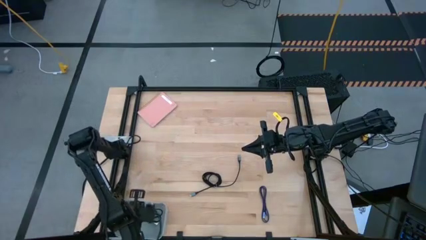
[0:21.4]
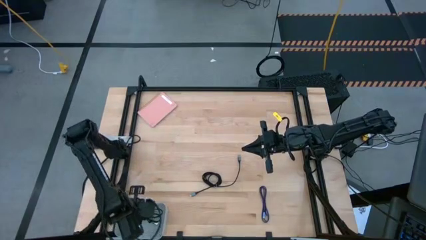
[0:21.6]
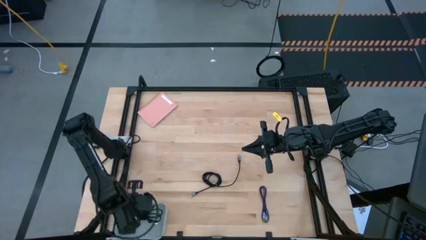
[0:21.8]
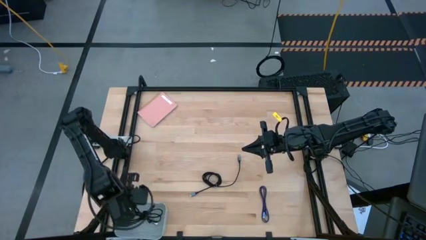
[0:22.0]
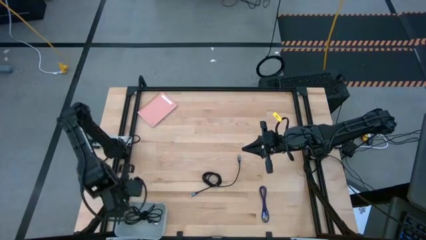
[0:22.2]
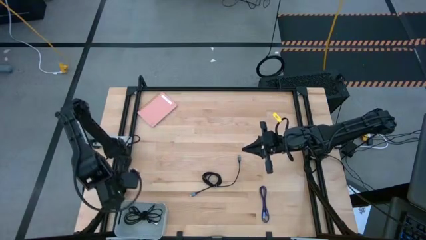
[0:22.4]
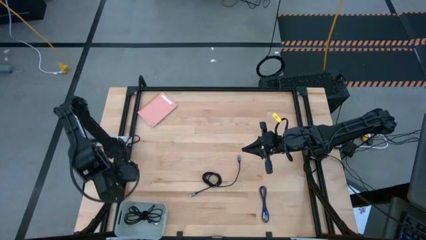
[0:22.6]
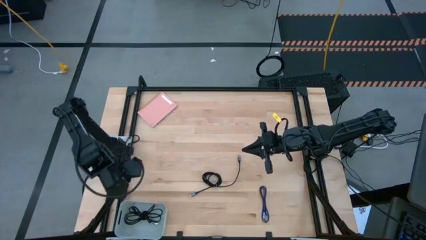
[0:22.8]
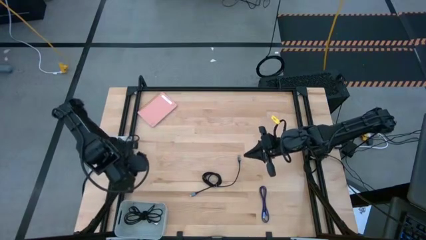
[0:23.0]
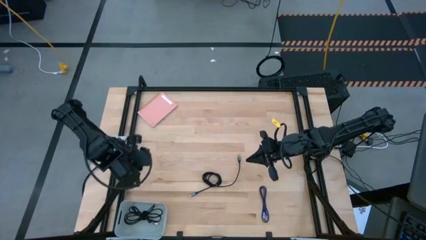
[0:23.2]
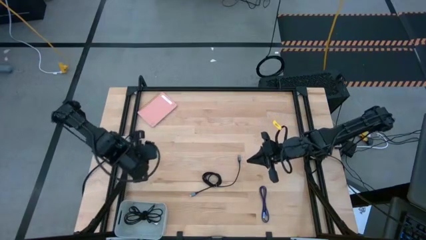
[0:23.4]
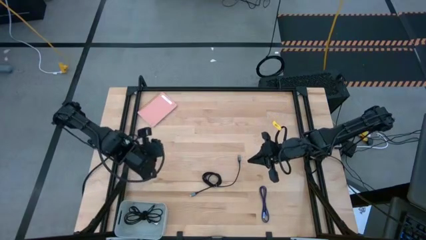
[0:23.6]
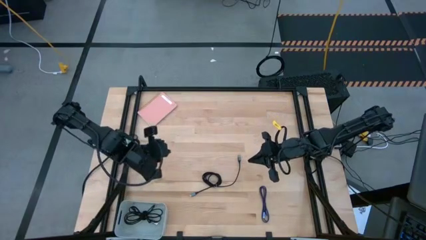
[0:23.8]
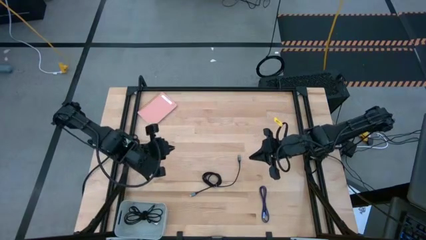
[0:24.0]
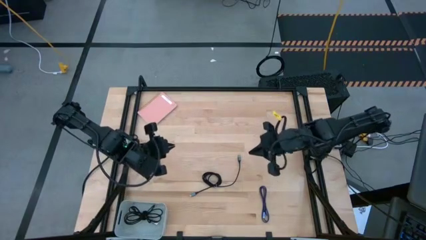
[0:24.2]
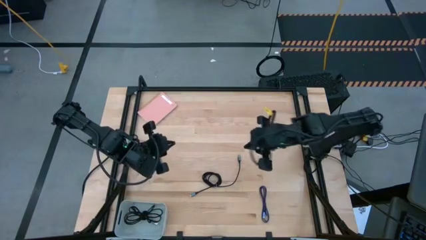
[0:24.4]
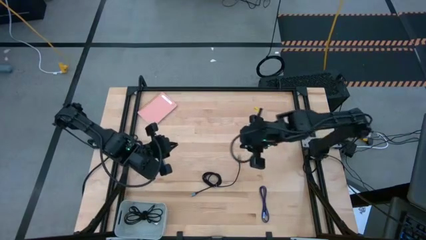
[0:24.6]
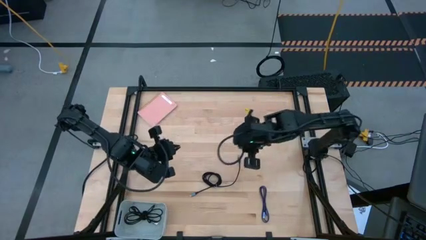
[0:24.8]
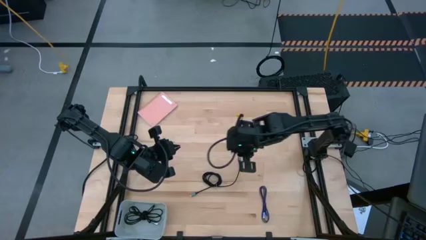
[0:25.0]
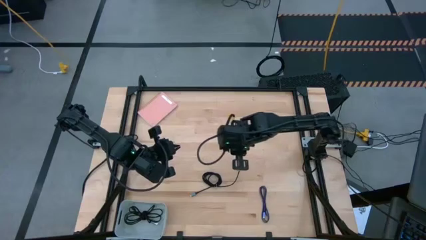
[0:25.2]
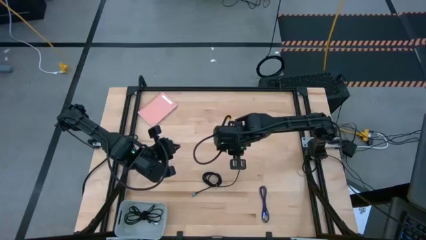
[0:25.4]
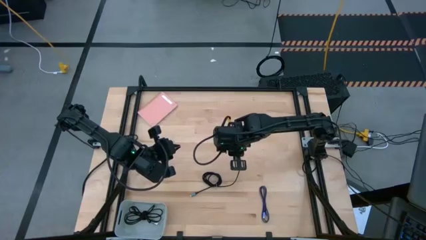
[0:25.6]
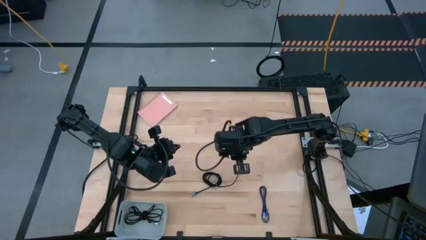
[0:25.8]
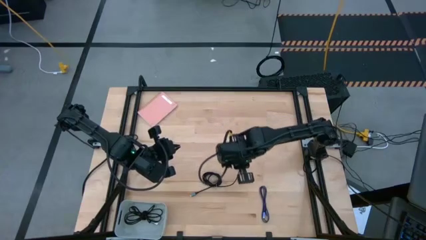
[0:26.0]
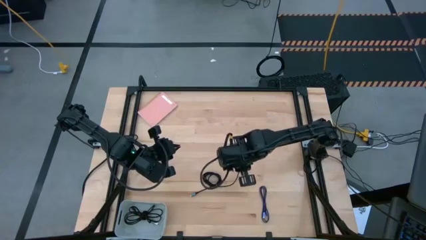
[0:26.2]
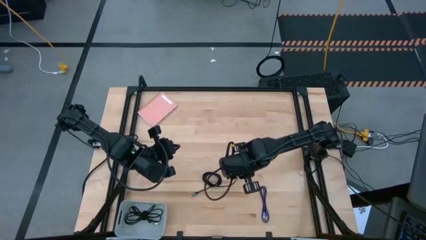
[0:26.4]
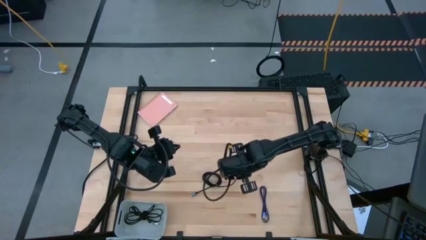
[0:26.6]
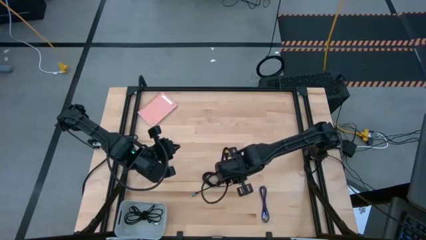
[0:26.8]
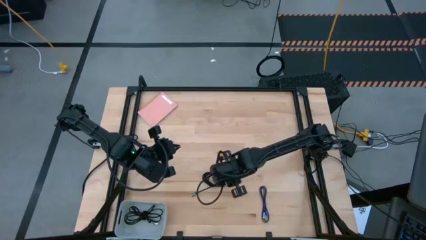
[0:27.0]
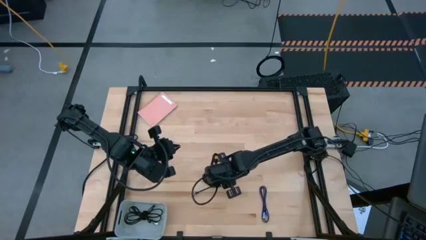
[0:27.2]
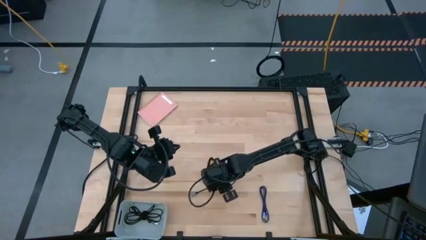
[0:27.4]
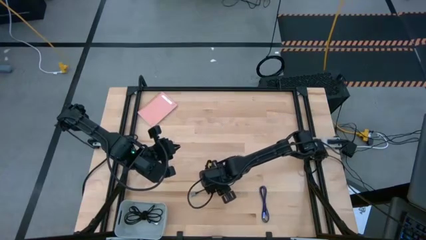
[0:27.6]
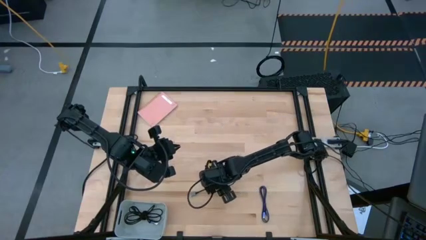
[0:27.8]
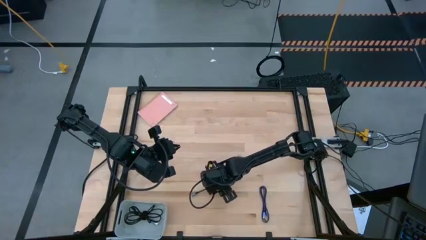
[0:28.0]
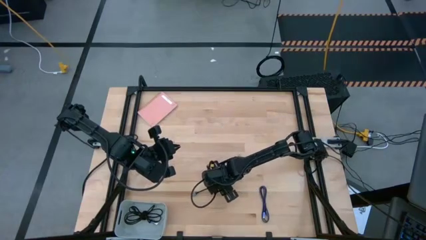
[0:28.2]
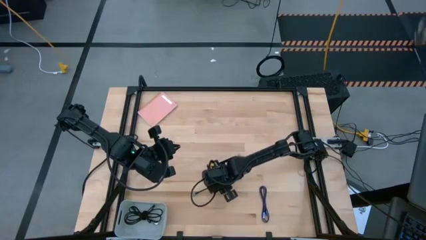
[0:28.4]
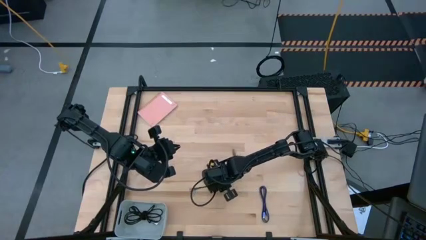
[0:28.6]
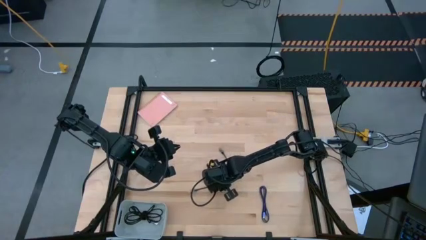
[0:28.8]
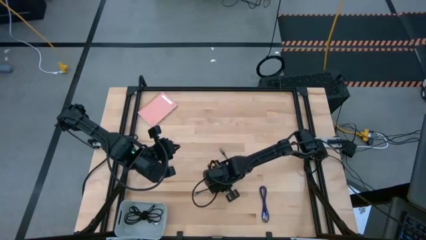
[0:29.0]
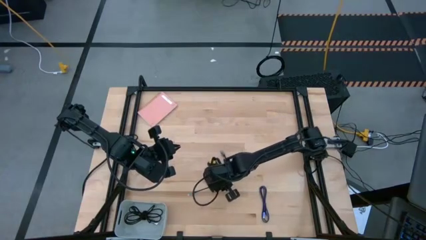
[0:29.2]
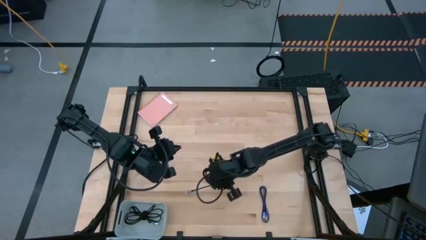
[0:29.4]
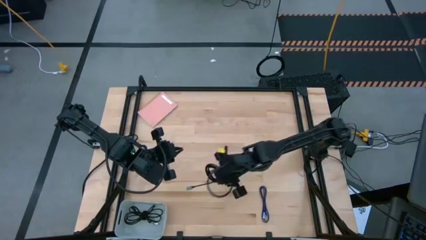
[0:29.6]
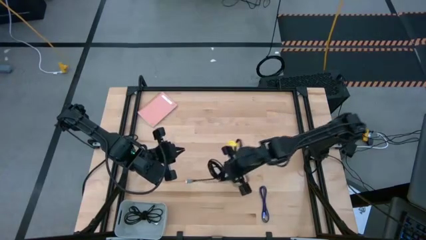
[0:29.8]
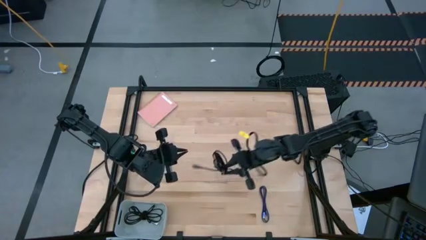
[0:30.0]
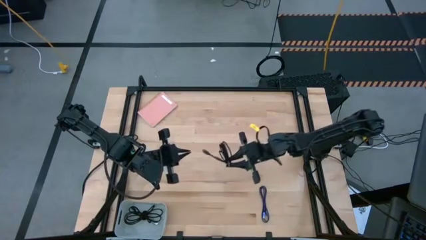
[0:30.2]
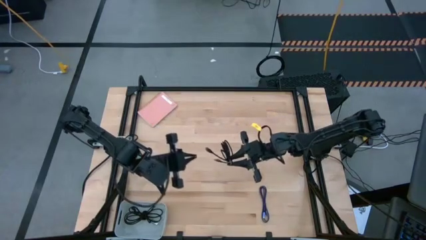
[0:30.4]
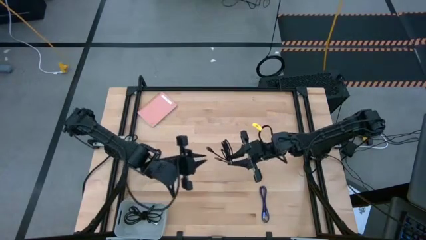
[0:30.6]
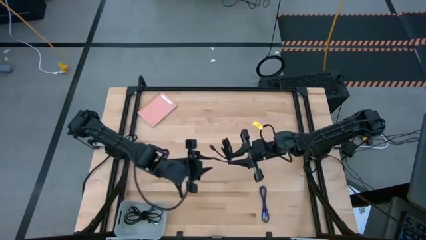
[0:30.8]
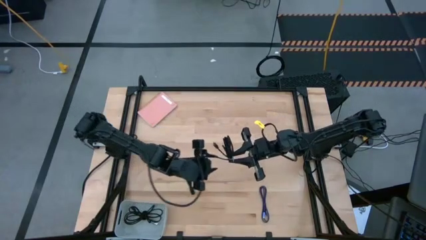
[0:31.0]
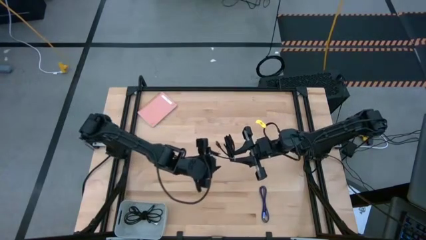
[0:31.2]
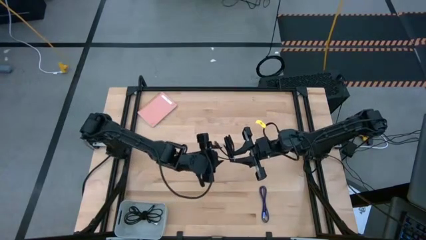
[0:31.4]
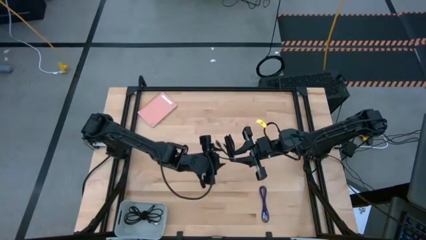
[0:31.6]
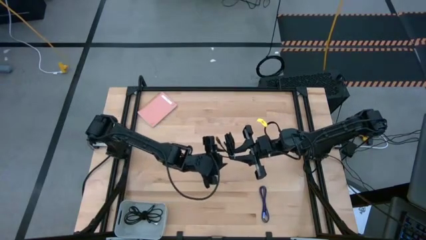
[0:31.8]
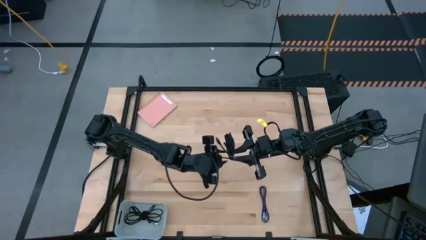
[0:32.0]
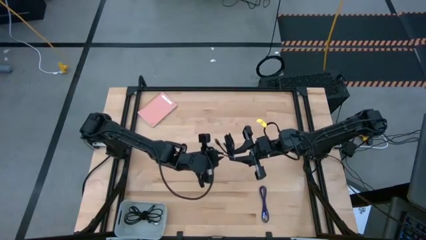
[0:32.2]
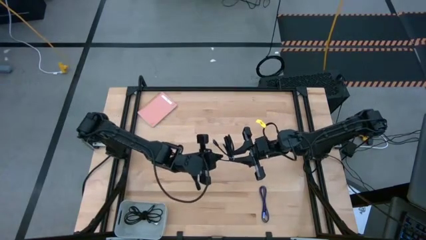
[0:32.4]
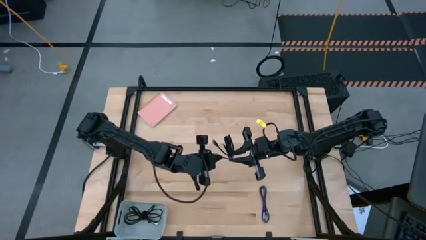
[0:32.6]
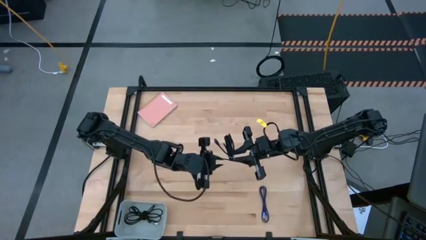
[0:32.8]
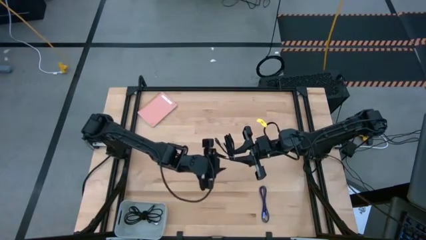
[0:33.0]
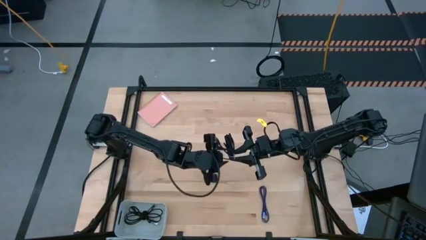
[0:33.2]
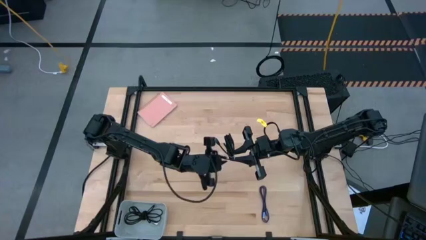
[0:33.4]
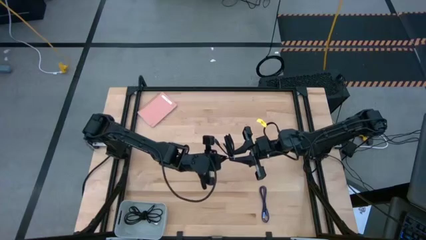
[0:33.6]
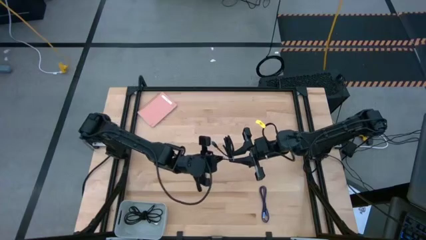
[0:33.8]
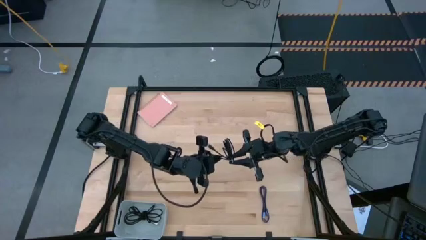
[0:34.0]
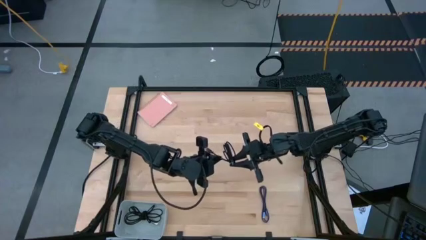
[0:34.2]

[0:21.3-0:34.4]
Task: Pick and place USB-C Cables
Put the black charger cable into the white bin

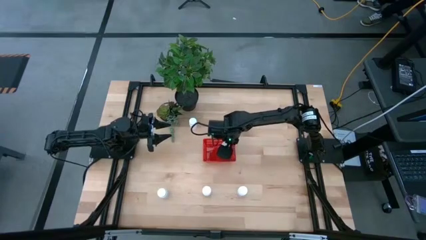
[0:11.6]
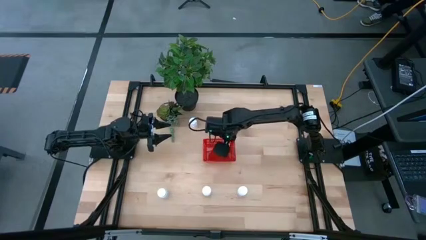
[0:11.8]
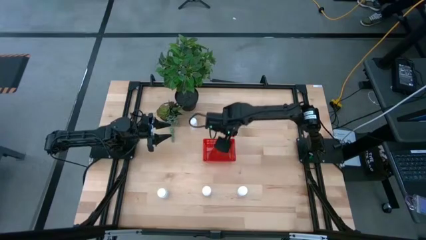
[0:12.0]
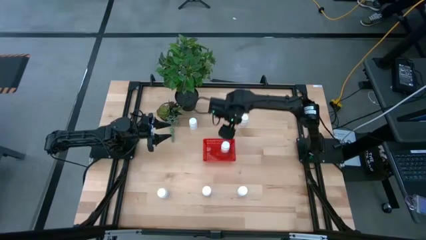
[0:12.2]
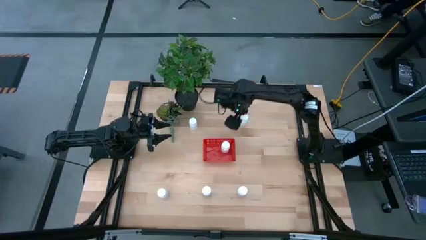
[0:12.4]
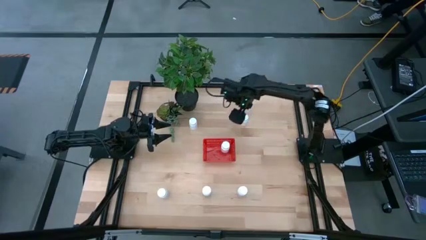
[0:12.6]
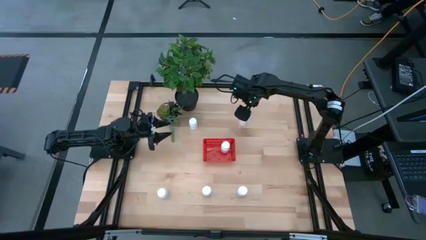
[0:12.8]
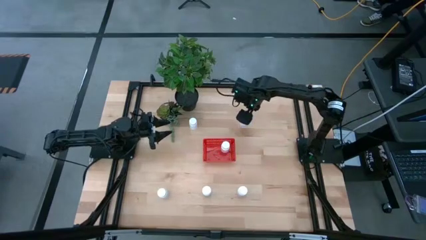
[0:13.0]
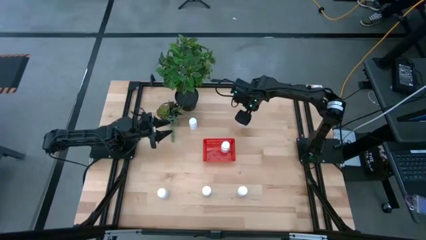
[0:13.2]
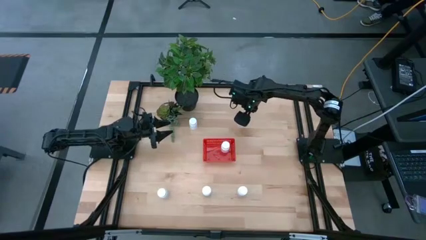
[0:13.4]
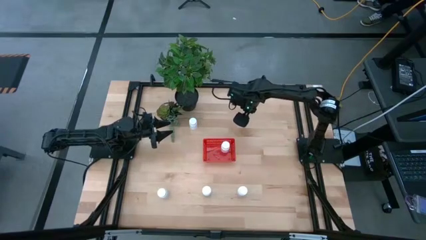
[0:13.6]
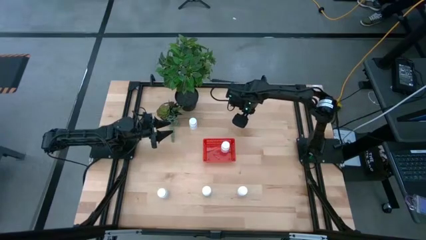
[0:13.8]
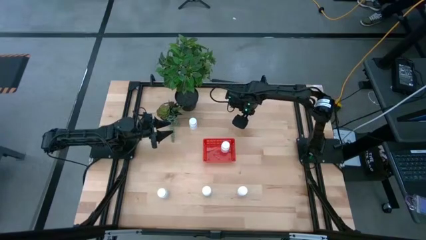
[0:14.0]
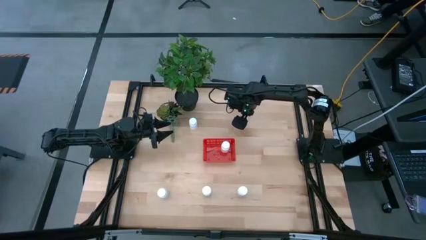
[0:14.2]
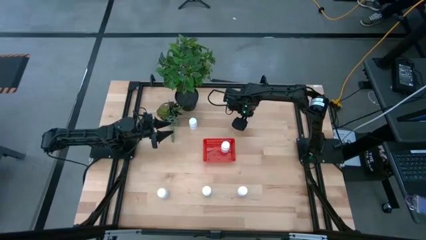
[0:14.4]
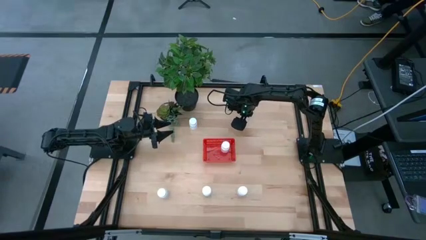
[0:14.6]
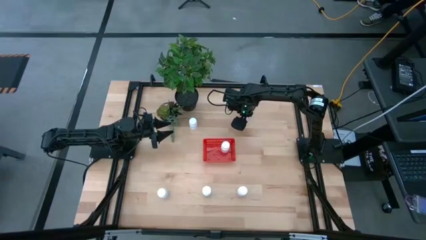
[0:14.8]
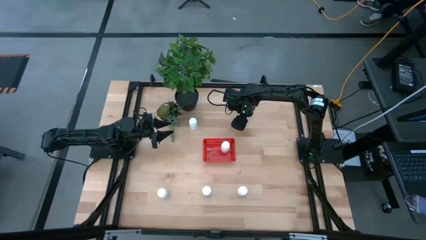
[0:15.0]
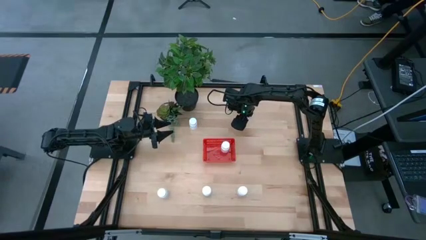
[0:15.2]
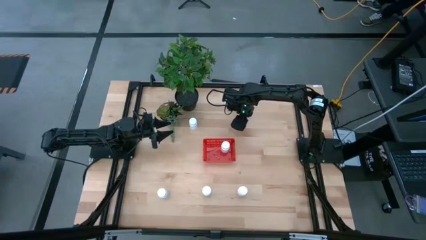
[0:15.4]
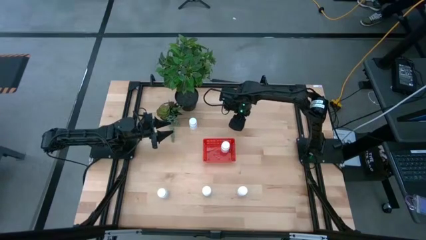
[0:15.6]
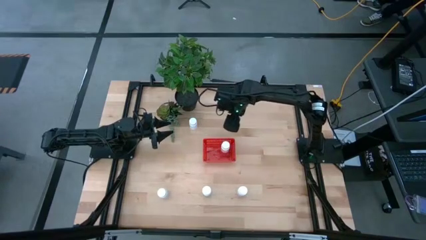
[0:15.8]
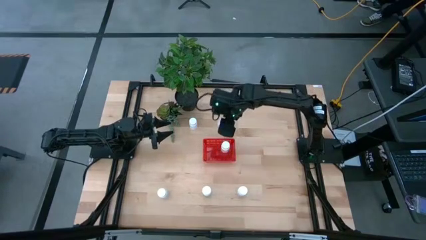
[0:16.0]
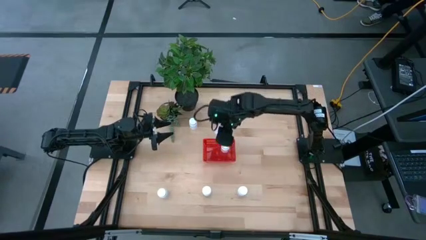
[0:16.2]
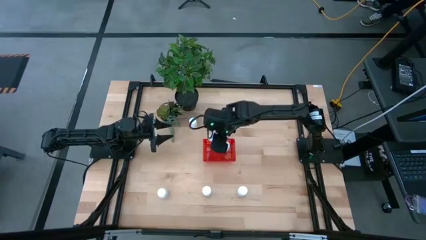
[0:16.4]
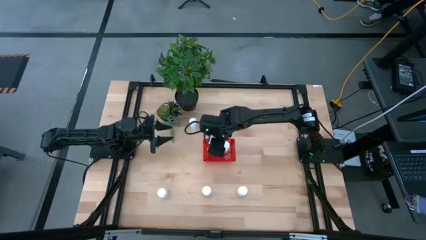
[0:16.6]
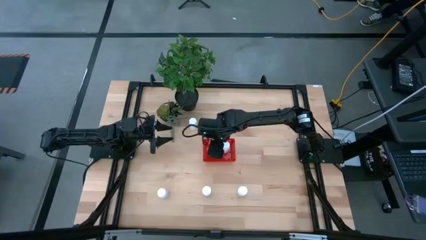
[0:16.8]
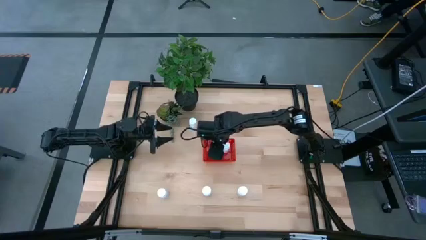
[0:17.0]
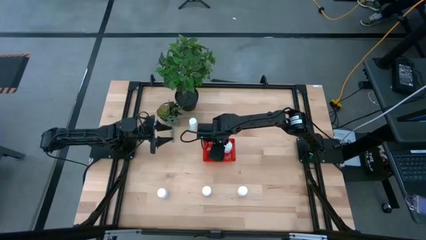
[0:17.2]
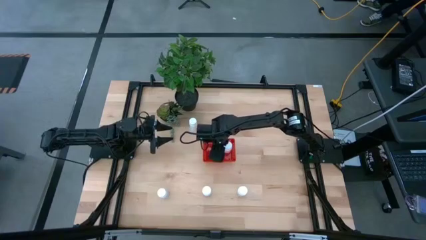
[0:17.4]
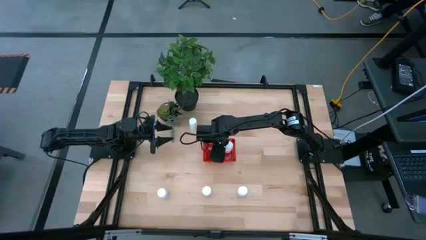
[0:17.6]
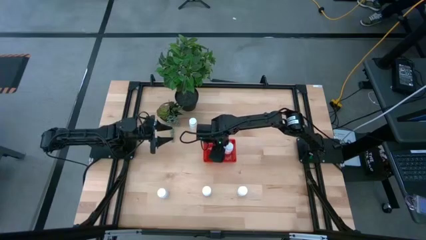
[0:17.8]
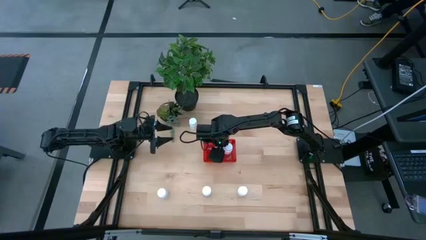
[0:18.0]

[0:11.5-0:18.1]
Task: Pick and place pill bottles into a basket
Put the white pill bottle into the red bin
